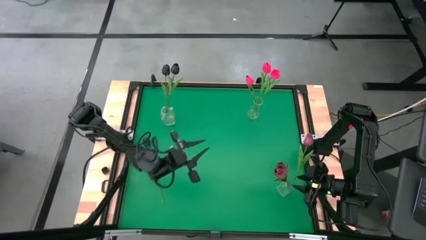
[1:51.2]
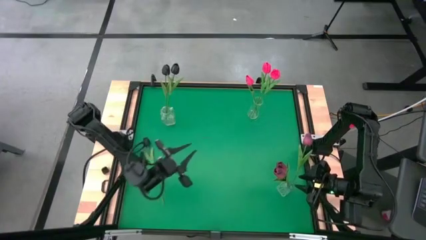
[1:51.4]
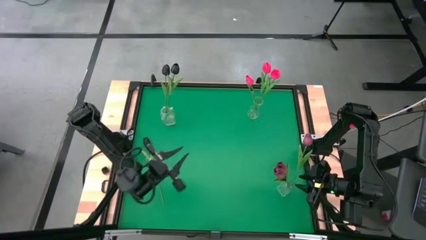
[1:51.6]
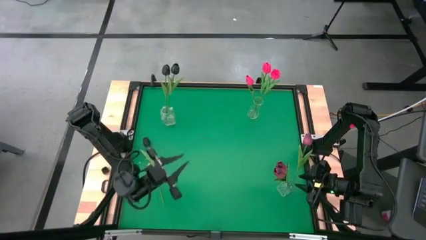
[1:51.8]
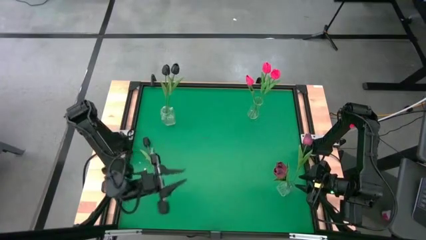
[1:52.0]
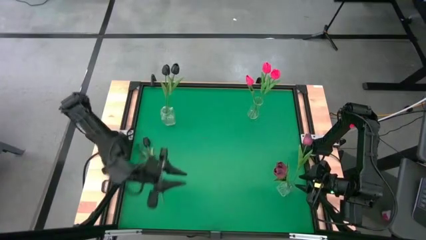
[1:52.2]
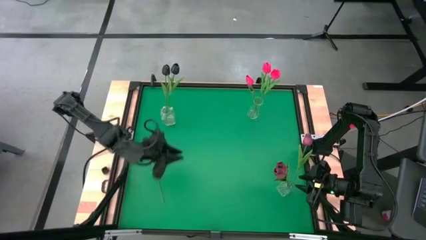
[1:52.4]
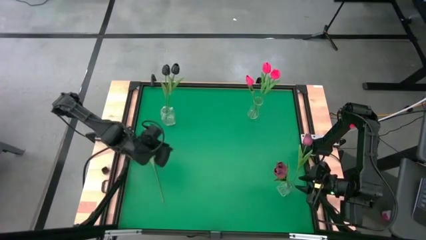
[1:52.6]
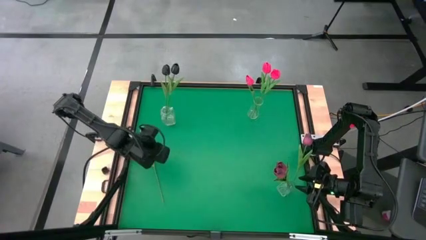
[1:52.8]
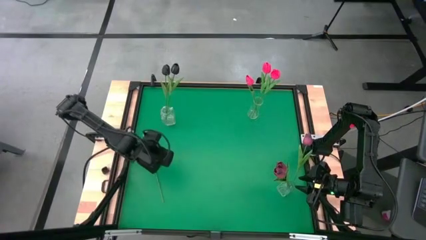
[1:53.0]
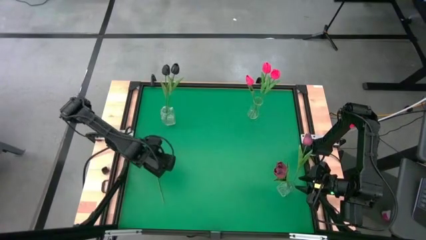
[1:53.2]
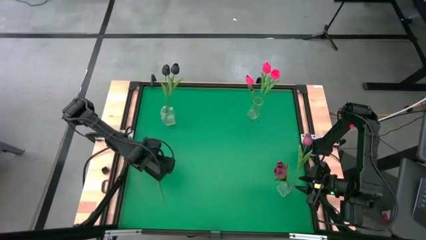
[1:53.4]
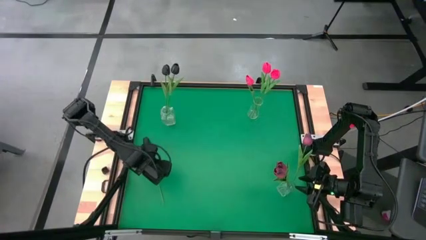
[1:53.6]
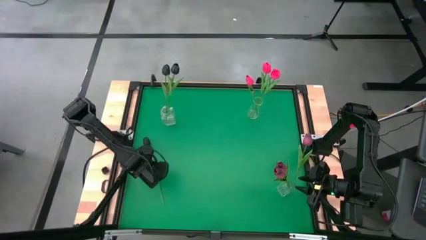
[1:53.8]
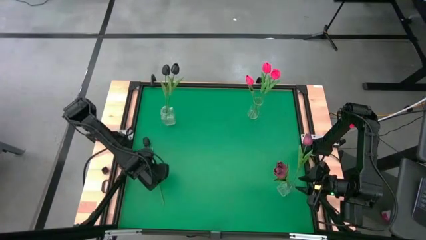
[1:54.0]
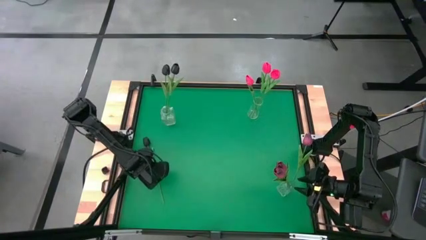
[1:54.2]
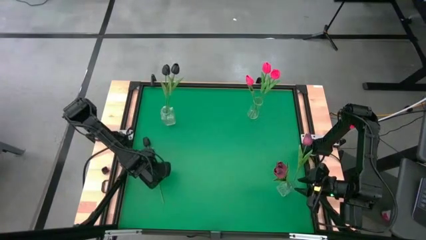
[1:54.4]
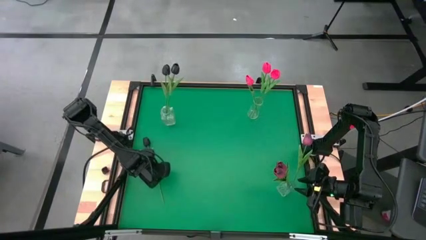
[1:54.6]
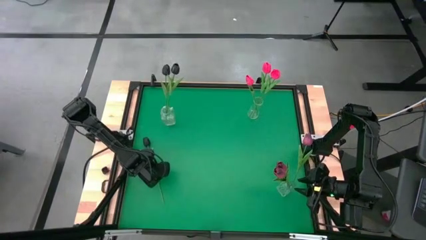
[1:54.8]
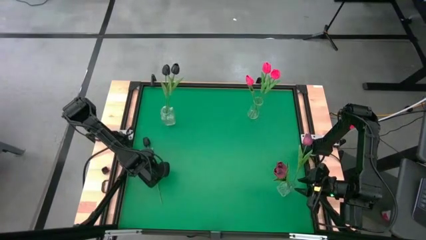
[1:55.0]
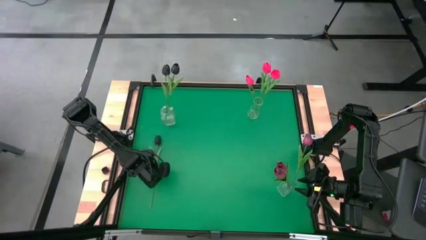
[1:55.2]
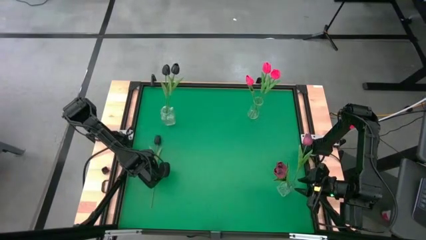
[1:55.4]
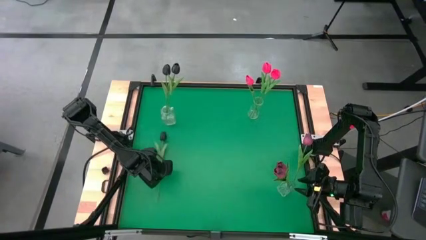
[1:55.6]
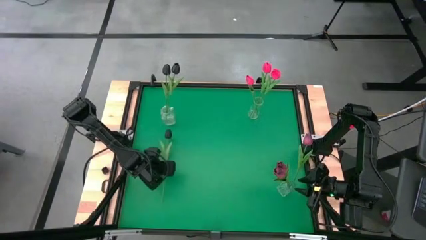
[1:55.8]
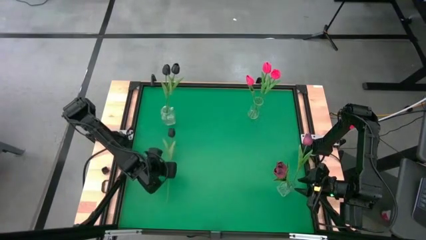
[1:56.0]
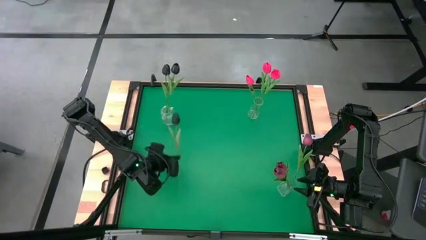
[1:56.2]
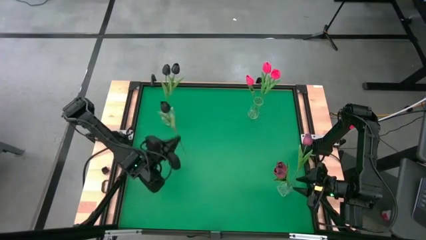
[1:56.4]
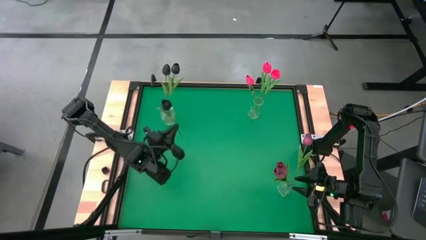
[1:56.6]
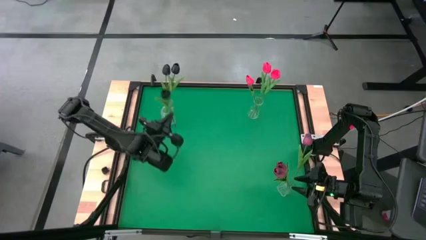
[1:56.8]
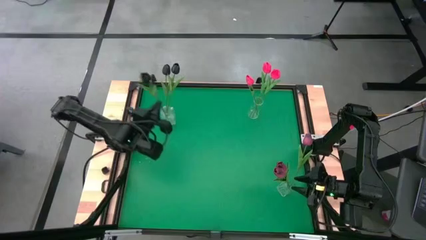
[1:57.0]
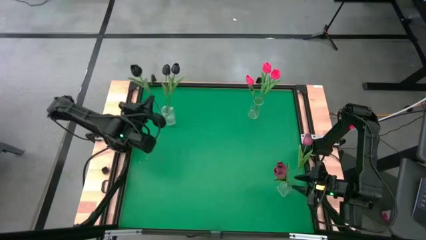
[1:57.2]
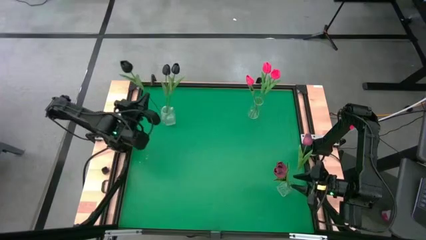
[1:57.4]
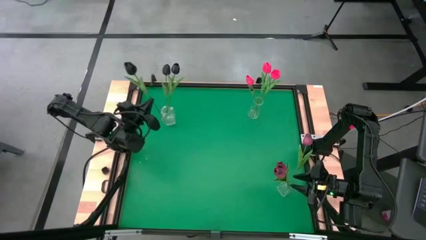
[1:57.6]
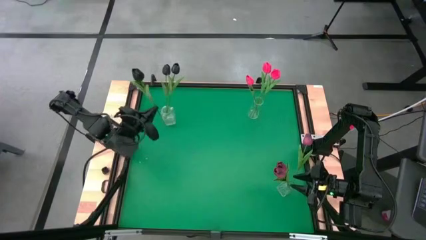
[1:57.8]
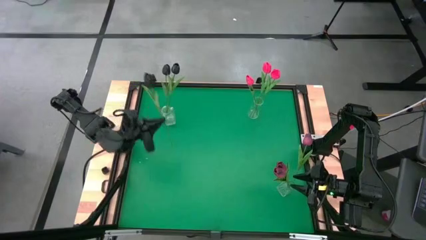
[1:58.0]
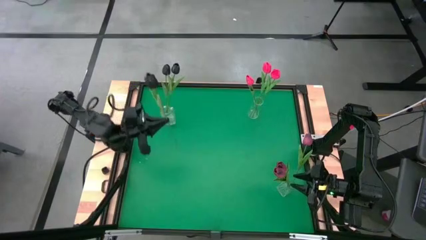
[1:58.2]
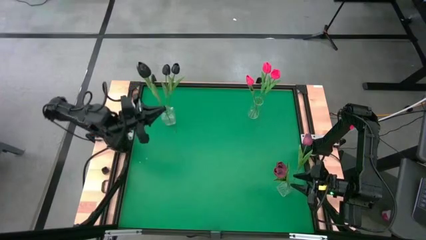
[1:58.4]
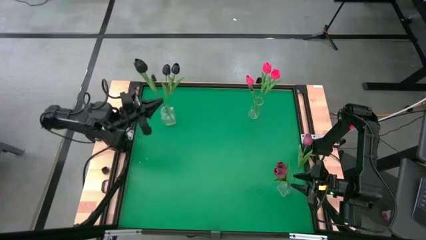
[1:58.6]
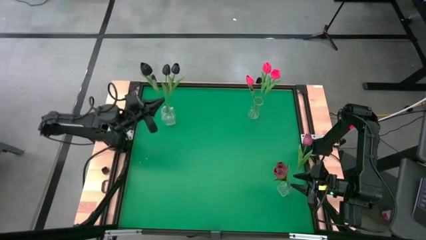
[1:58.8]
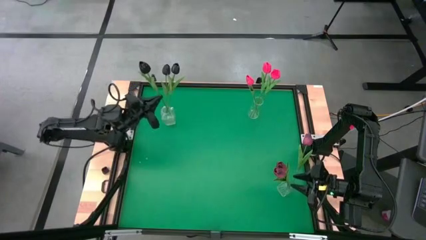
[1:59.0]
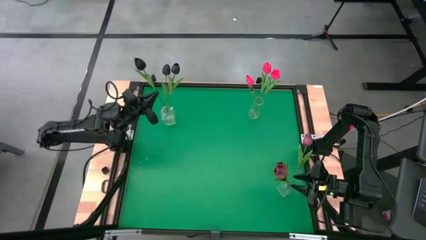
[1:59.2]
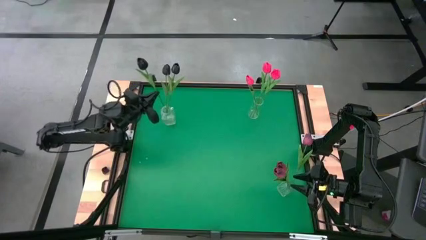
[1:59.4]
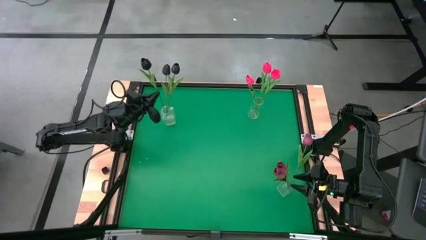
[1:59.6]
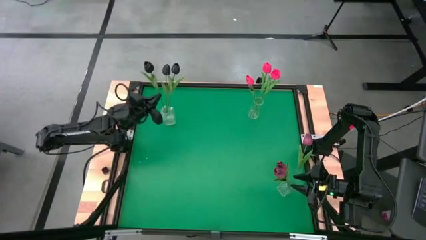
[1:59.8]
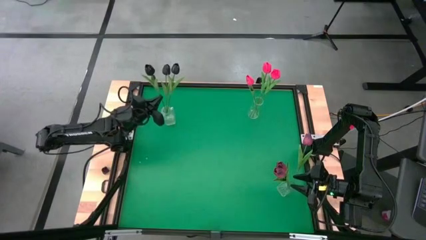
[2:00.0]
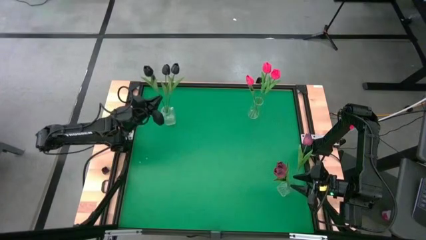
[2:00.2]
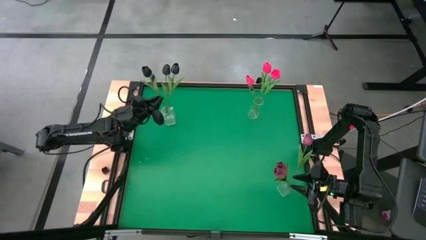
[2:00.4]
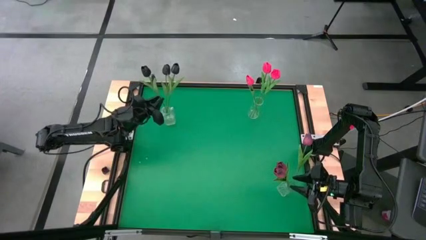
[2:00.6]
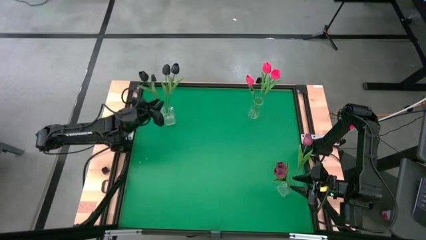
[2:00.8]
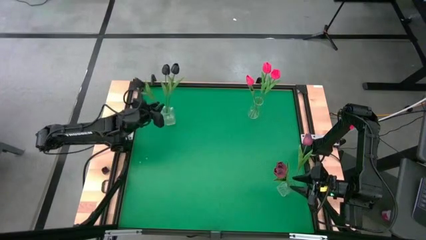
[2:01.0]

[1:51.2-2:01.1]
Task: Sort flowers into vase by color
Put the black flower into the top left transparent vase

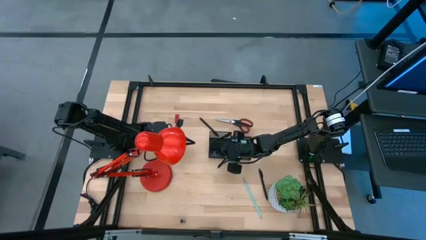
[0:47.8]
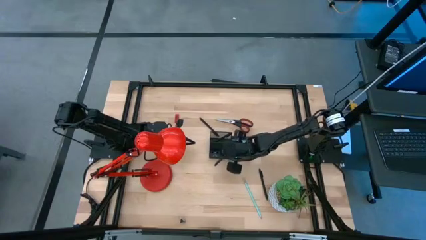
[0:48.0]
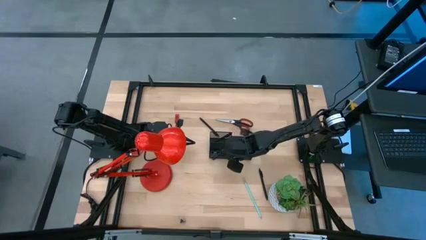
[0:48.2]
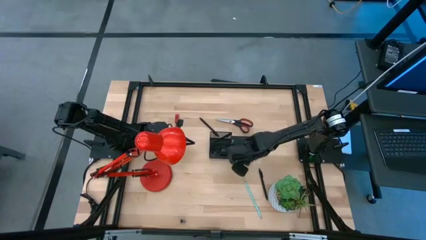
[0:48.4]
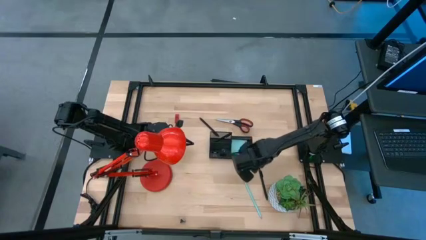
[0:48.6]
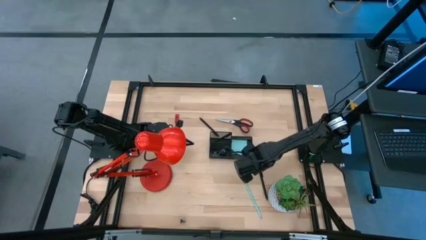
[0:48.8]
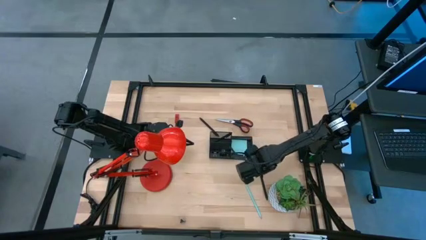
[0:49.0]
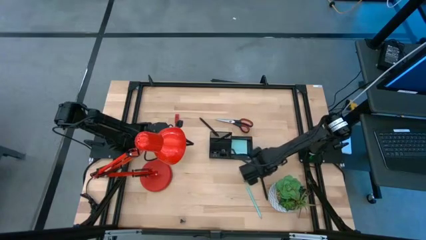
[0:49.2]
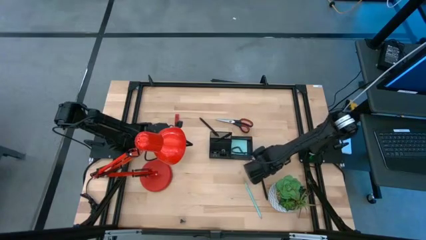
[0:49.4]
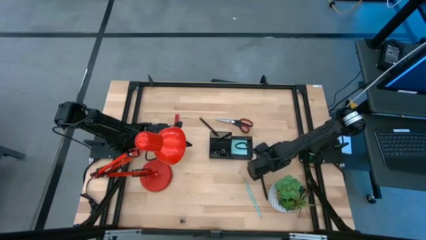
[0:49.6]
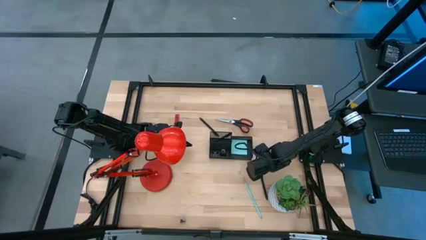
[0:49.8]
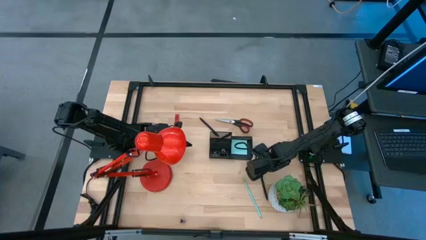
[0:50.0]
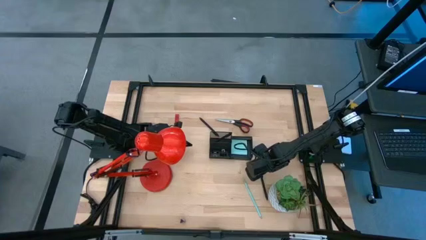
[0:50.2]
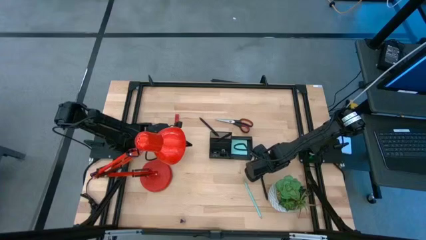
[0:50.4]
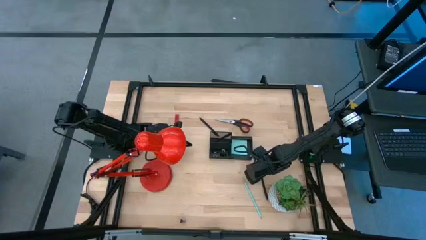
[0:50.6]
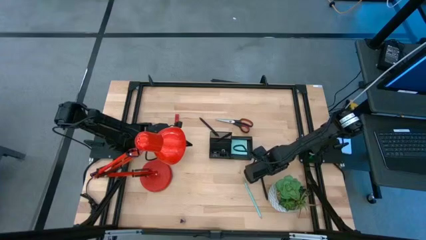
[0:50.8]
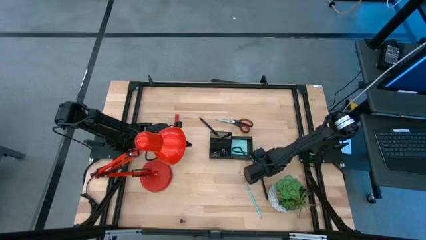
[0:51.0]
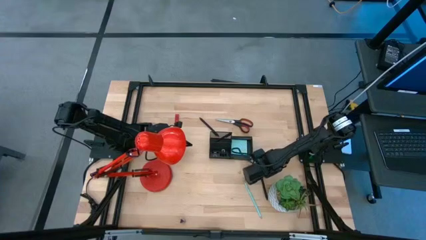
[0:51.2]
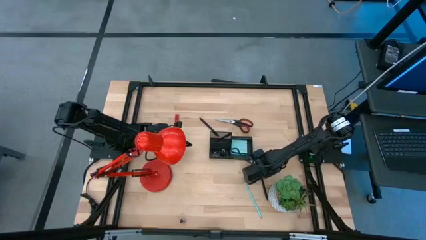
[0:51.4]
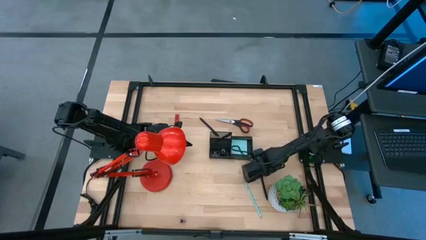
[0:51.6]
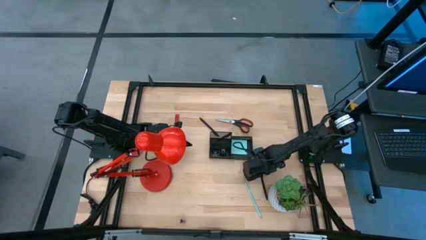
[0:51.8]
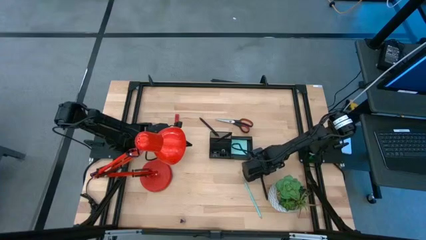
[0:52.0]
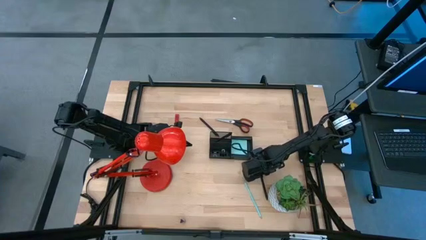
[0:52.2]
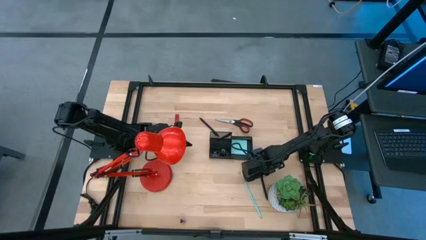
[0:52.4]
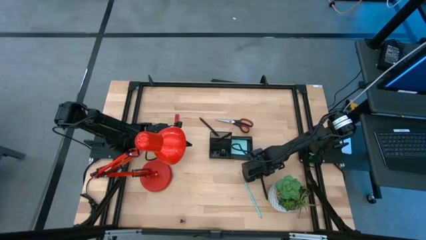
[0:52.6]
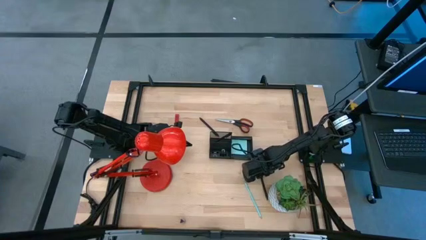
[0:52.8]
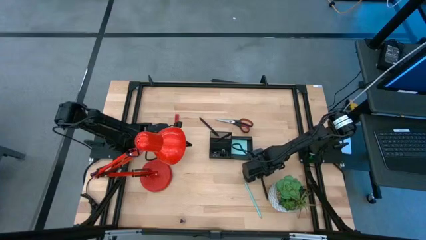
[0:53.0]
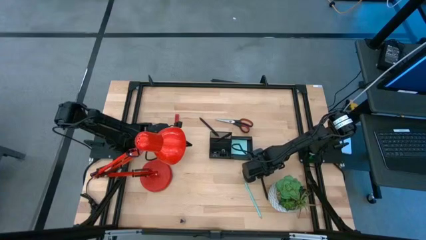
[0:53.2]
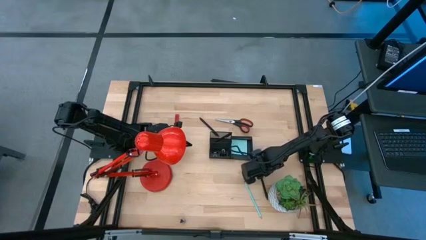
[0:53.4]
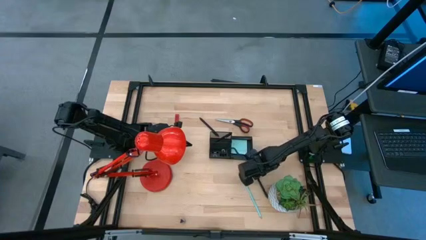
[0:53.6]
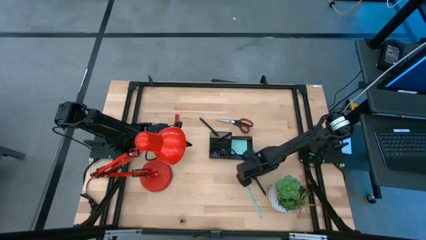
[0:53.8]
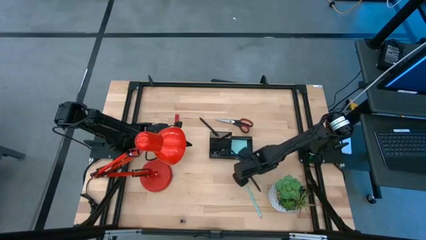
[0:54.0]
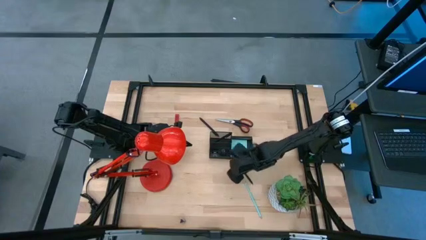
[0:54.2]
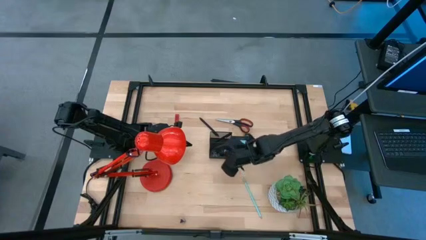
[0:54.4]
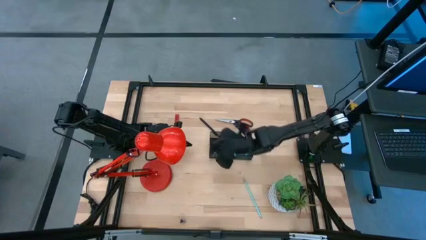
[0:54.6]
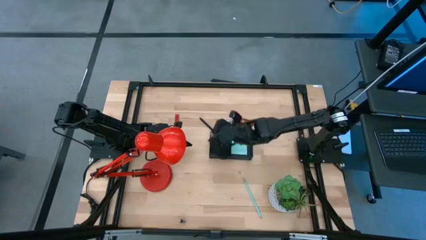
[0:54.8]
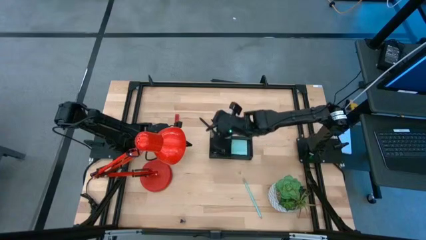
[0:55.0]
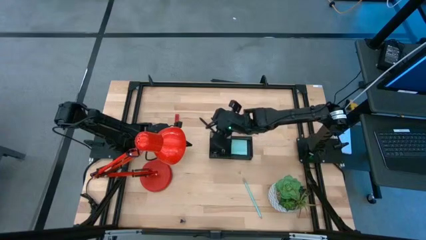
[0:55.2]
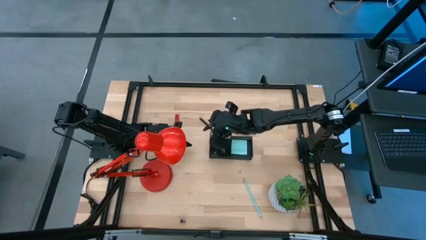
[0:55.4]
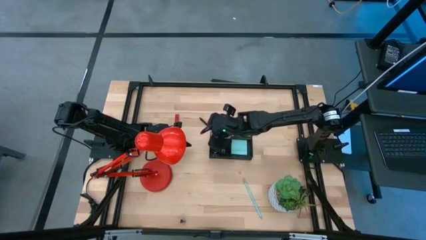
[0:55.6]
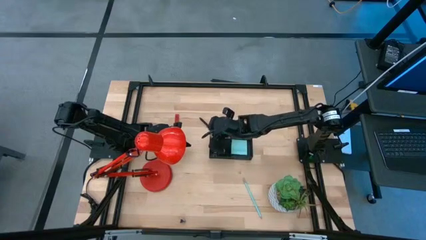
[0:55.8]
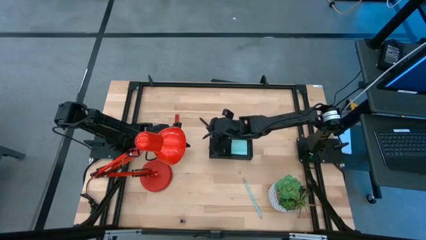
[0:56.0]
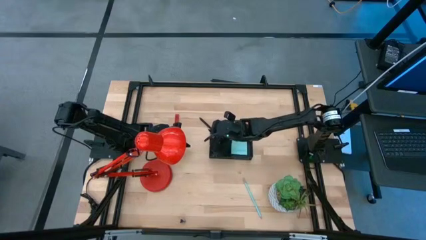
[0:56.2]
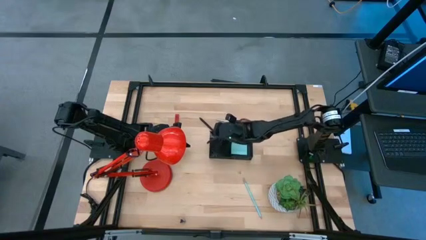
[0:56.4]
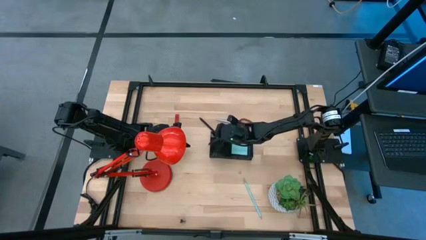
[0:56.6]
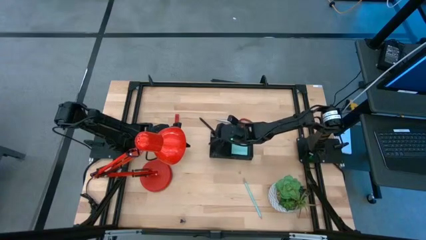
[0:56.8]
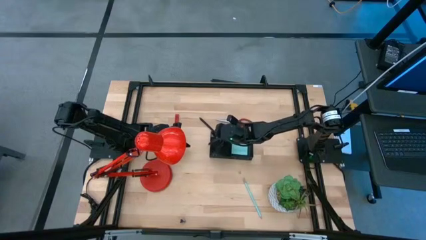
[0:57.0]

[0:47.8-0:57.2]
Task: Pick and place office supplies into organizer
Put the bottom black pen into the black desk organizer
